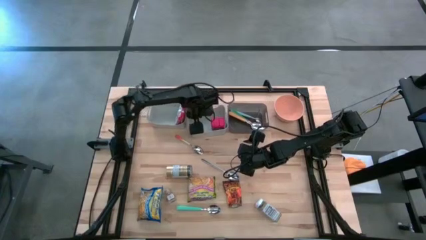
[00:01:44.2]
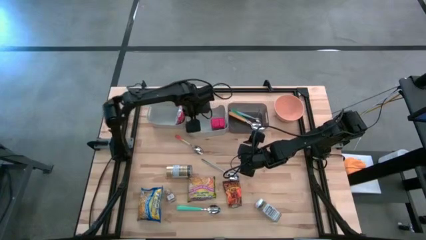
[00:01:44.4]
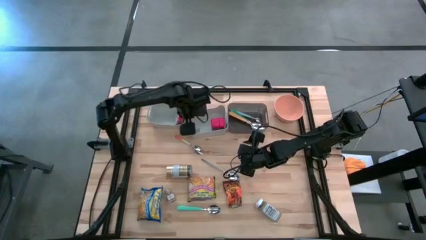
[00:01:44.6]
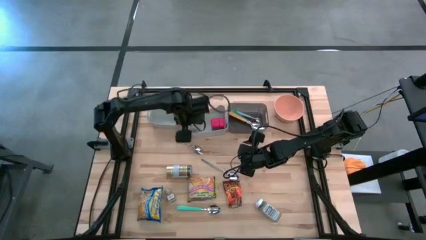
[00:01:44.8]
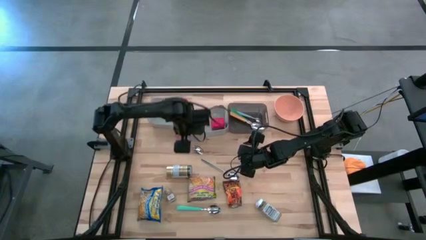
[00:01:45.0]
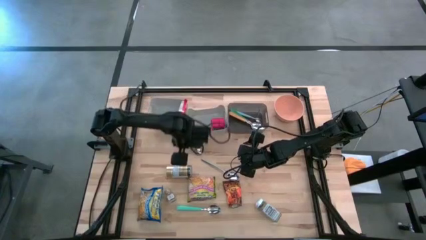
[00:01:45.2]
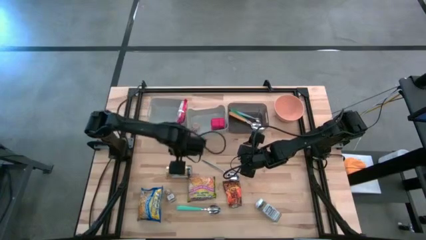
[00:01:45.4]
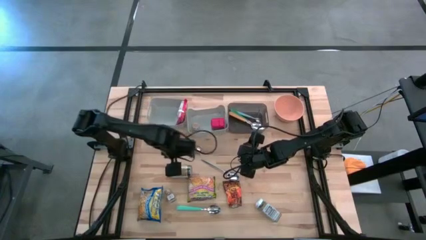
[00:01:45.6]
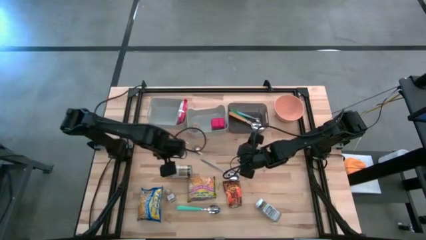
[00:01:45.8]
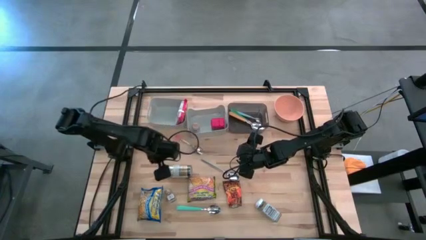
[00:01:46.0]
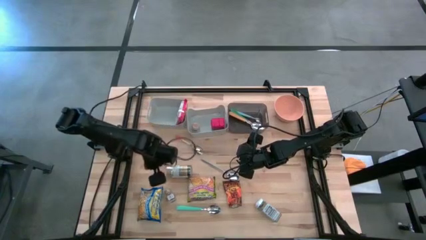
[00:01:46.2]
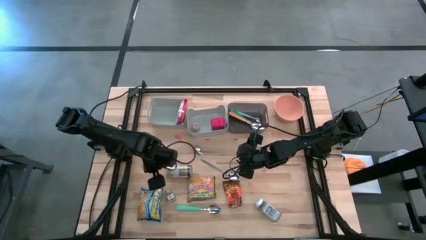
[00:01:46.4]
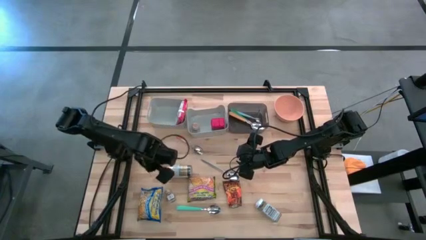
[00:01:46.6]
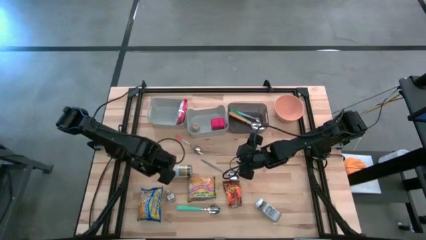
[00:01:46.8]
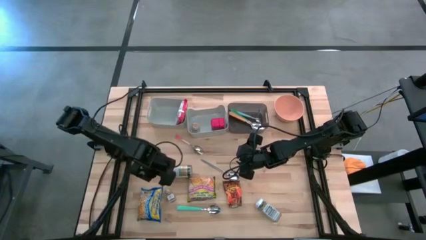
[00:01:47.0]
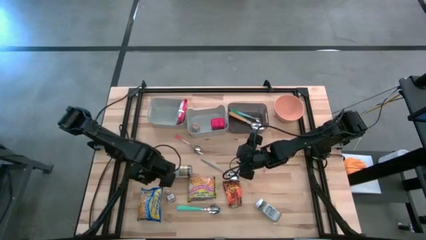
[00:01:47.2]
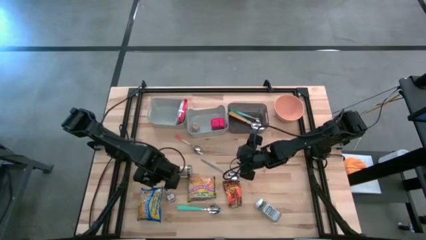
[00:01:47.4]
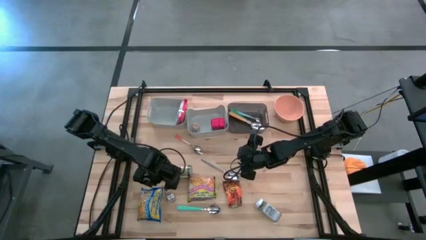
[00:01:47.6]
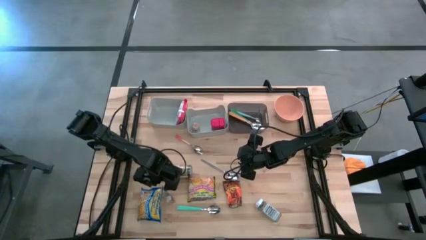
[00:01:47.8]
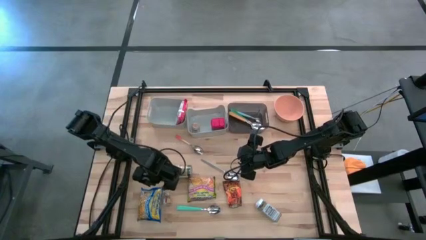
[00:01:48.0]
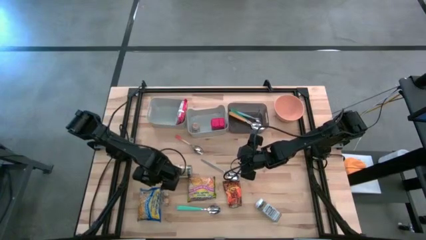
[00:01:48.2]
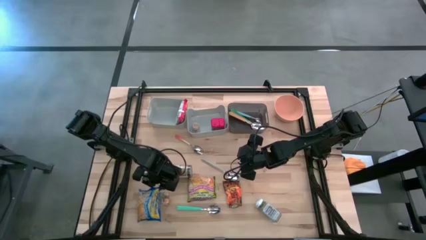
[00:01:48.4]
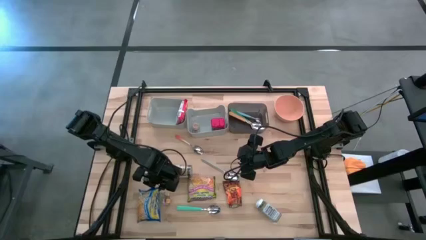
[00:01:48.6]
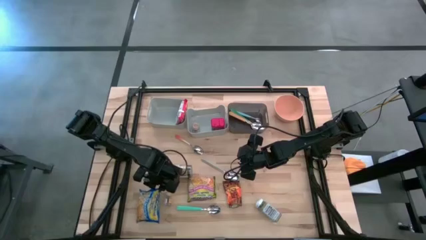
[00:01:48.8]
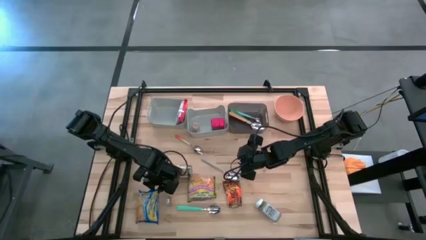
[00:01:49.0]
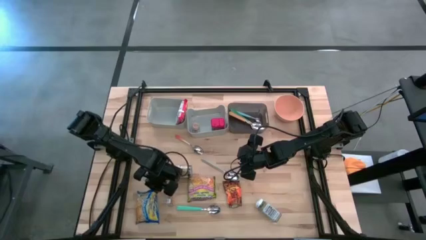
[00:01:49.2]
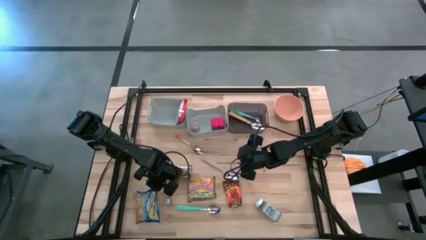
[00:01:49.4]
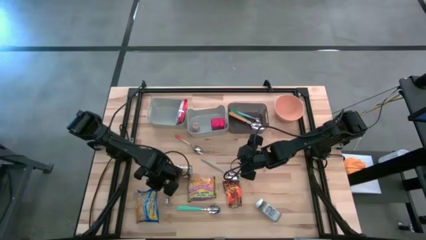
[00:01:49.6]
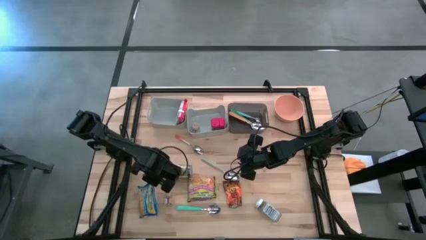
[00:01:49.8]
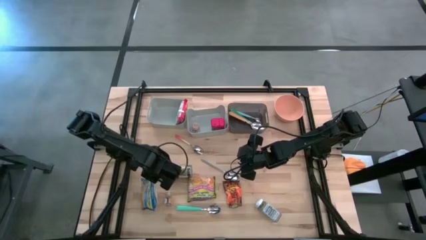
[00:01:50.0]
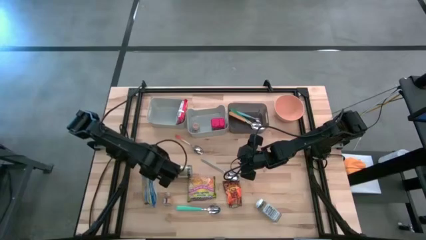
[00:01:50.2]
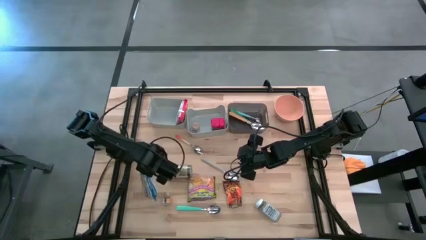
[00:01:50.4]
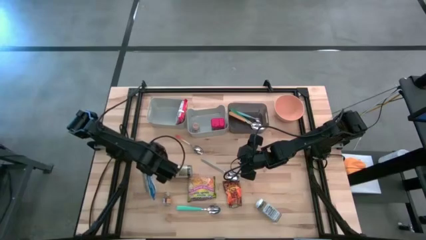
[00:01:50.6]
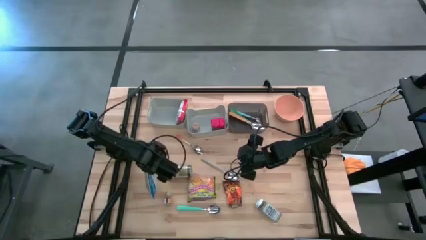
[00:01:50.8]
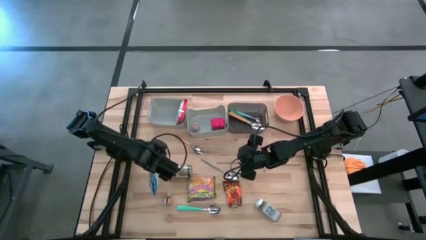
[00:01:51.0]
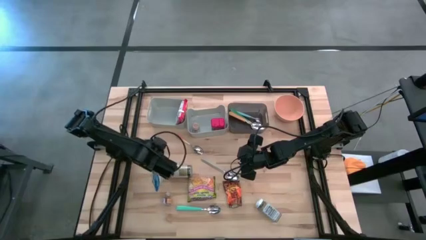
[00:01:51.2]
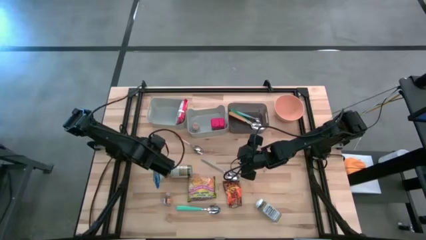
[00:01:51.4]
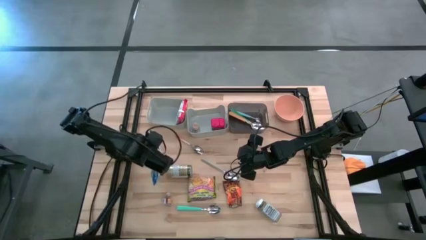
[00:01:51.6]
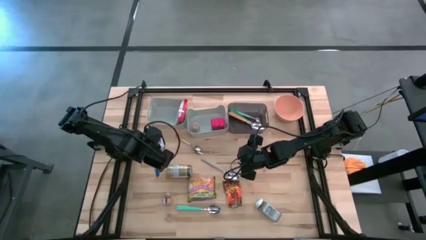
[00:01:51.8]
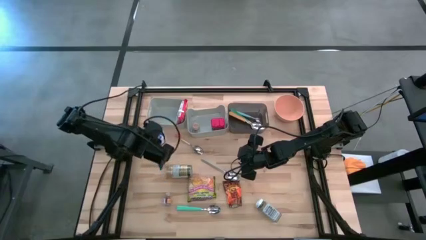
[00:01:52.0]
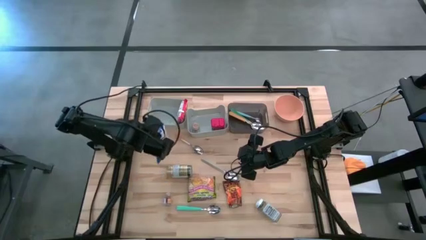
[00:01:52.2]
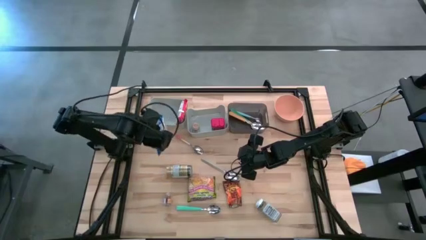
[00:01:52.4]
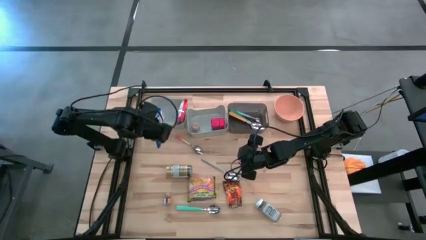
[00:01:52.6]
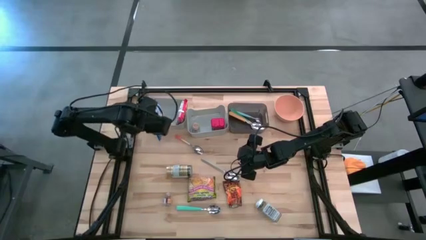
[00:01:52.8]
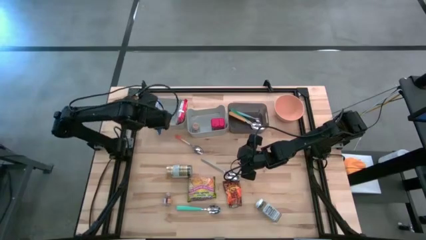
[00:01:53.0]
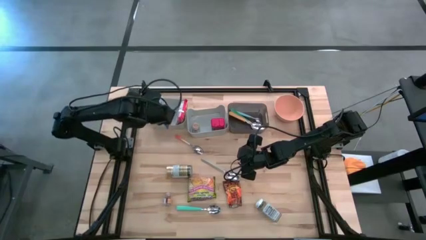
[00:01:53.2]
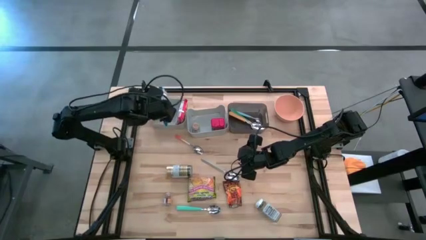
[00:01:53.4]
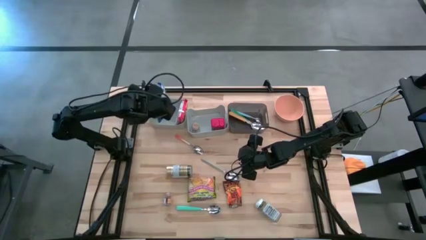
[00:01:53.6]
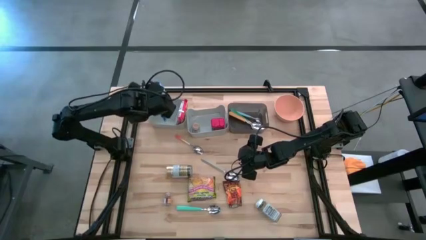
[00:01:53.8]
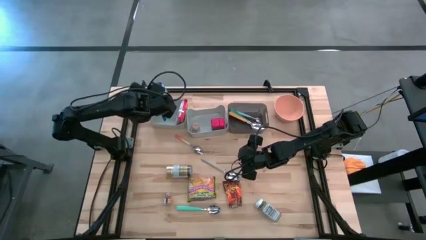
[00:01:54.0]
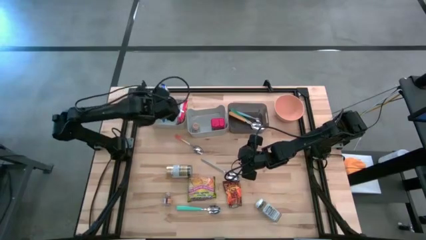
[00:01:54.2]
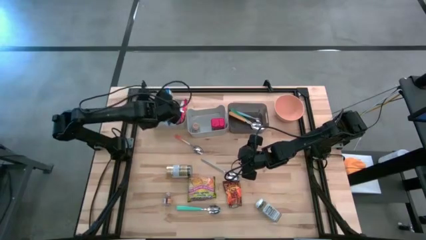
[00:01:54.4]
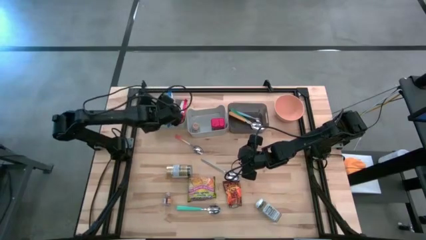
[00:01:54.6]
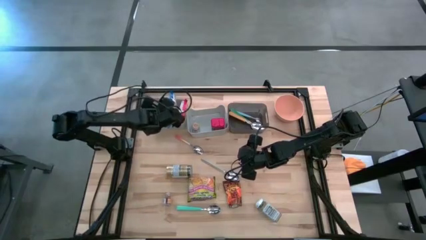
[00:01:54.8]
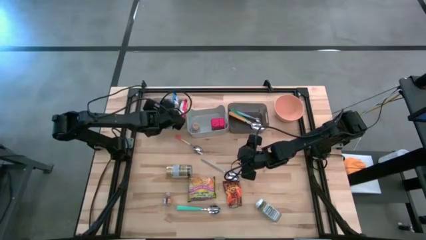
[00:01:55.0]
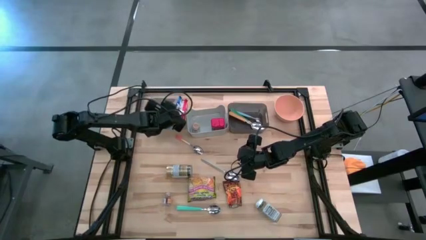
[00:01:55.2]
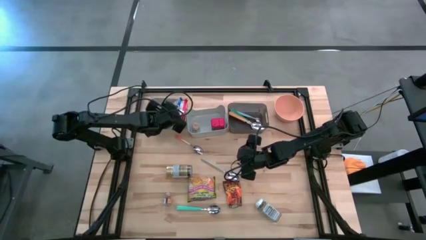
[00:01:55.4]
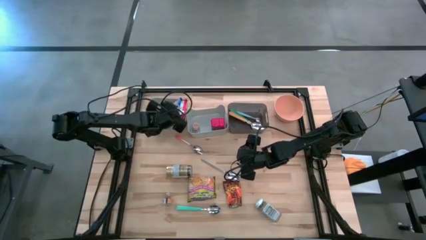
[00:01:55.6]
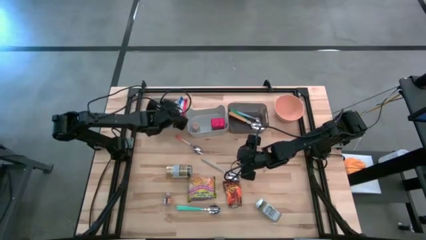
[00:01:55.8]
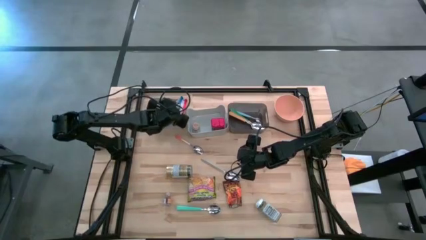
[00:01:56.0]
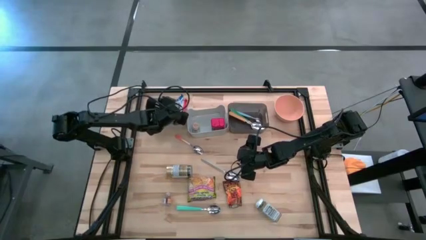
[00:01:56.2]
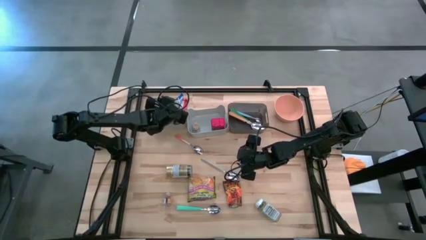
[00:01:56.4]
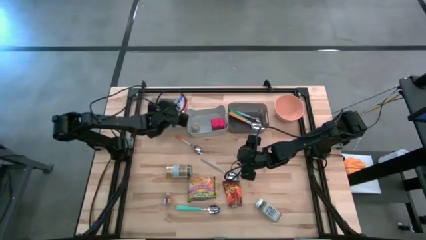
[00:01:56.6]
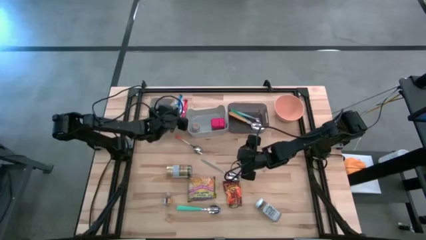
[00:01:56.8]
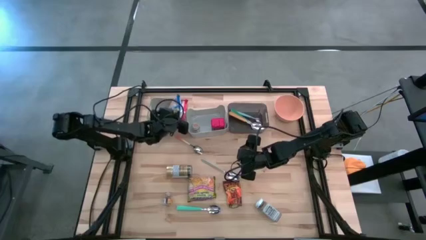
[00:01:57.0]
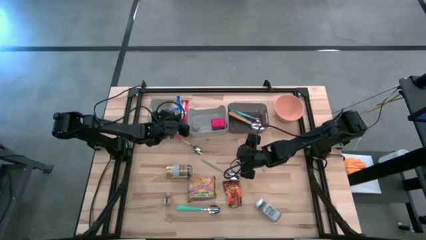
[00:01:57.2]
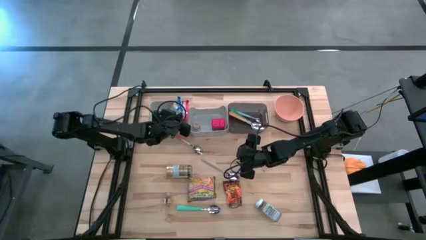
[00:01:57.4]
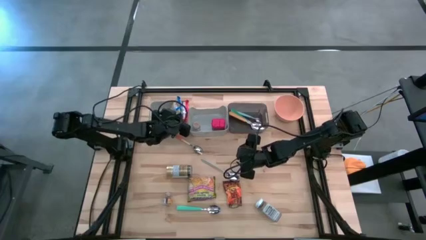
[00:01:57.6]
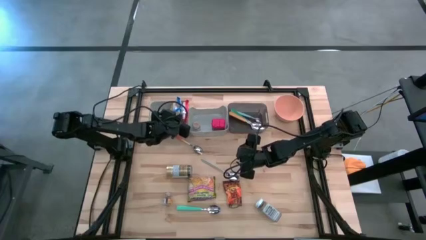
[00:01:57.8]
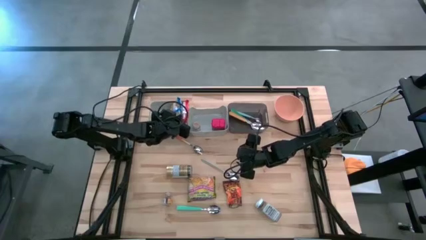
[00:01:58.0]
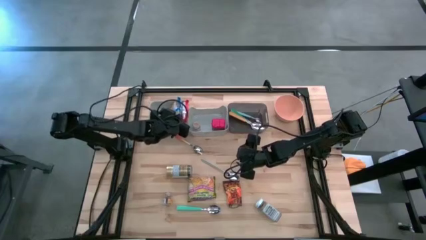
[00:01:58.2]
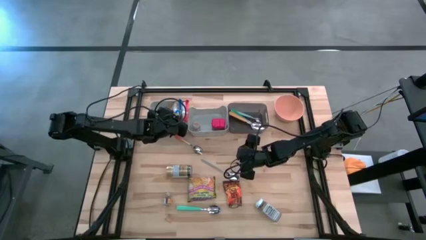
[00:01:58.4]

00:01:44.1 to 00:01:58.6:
Put the blue noodle pack into the left gray bin
